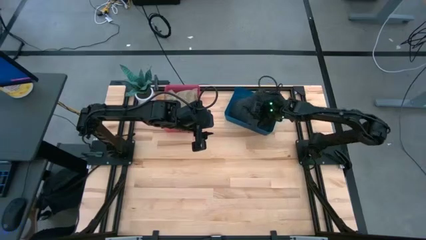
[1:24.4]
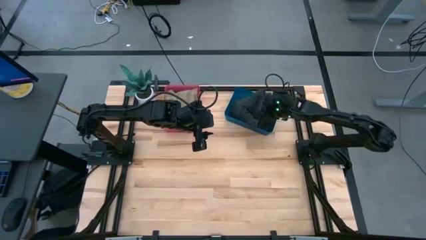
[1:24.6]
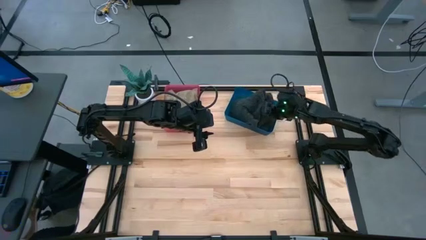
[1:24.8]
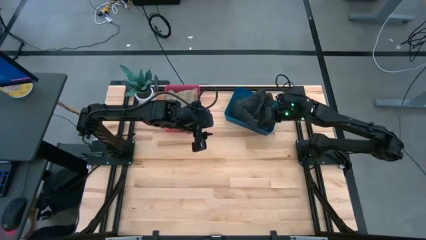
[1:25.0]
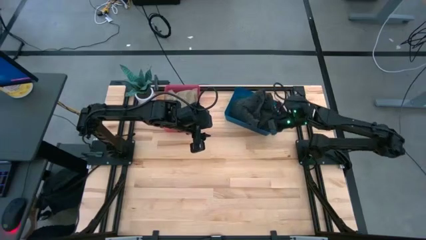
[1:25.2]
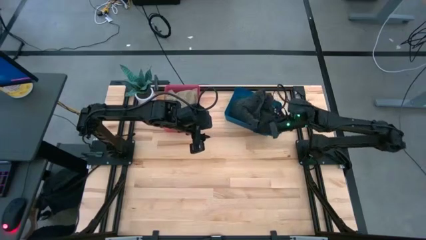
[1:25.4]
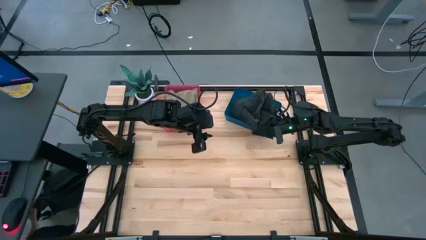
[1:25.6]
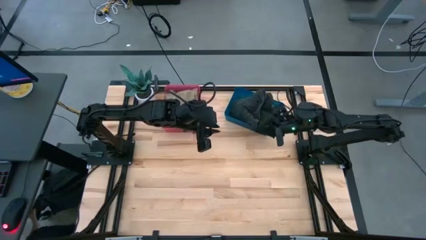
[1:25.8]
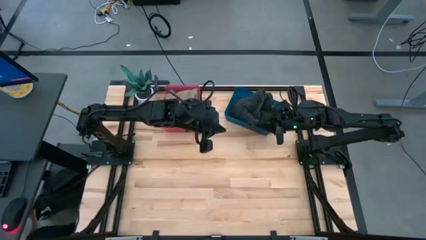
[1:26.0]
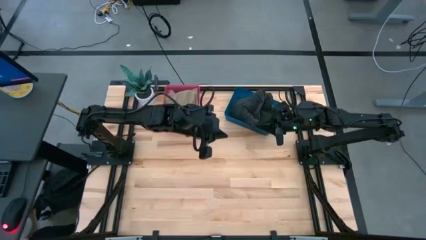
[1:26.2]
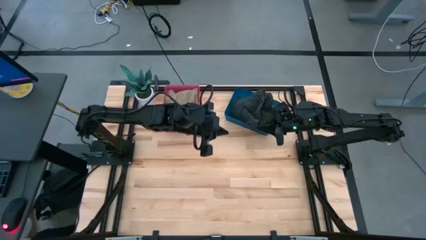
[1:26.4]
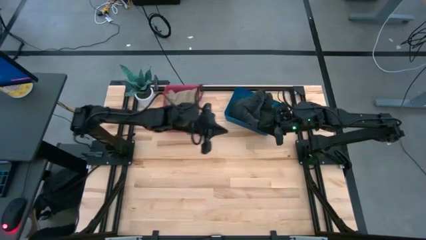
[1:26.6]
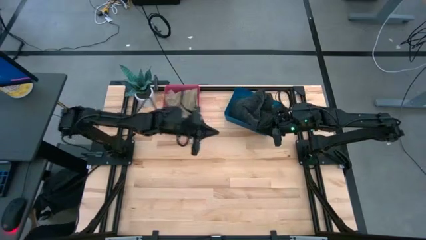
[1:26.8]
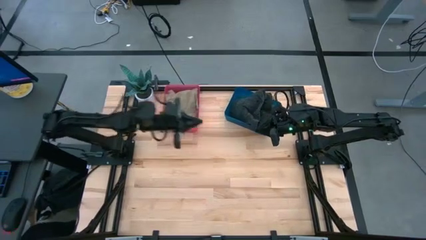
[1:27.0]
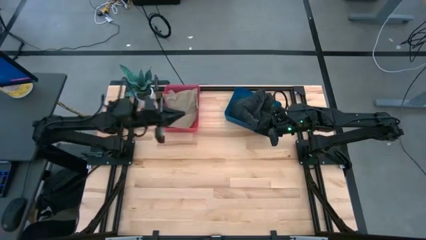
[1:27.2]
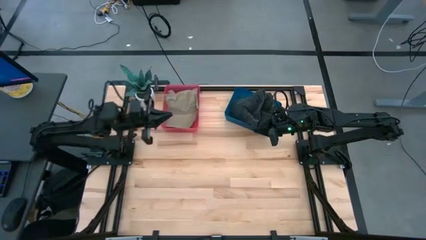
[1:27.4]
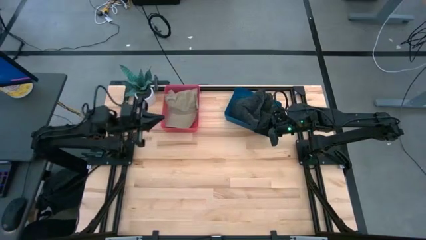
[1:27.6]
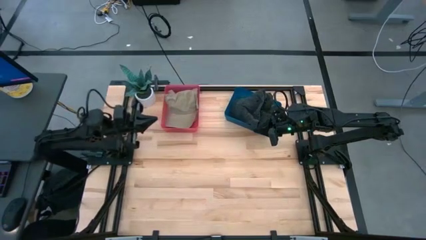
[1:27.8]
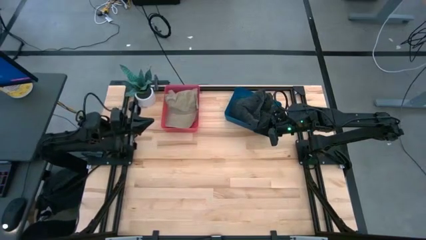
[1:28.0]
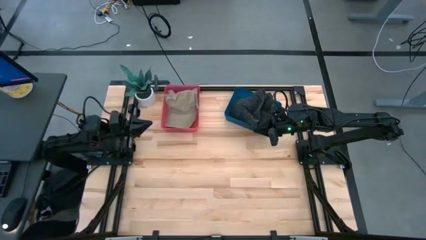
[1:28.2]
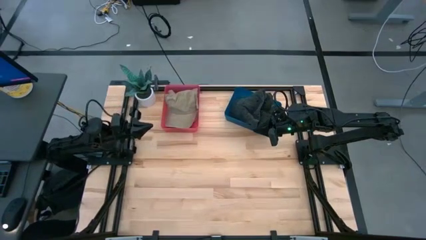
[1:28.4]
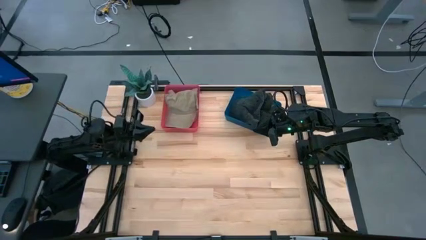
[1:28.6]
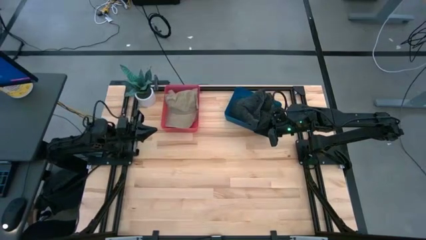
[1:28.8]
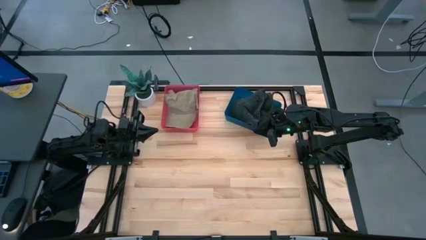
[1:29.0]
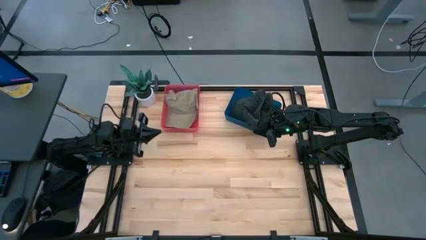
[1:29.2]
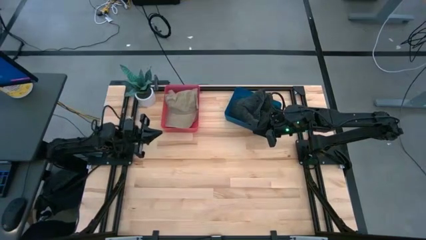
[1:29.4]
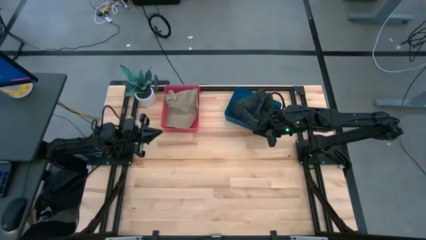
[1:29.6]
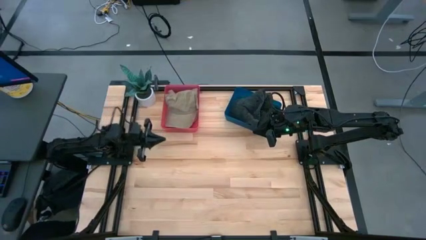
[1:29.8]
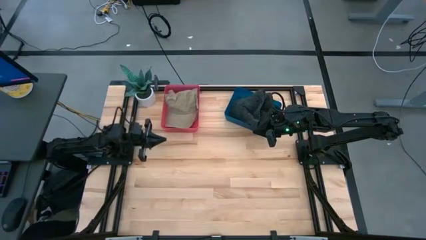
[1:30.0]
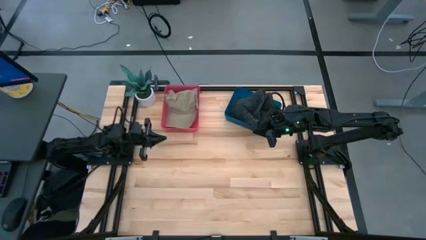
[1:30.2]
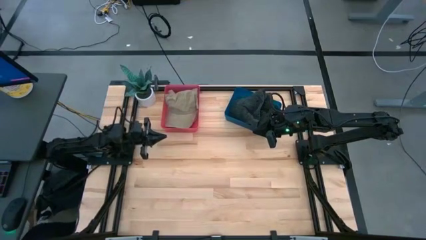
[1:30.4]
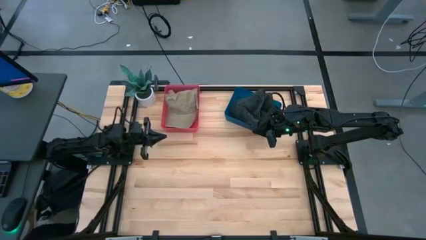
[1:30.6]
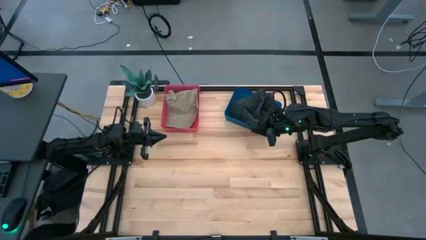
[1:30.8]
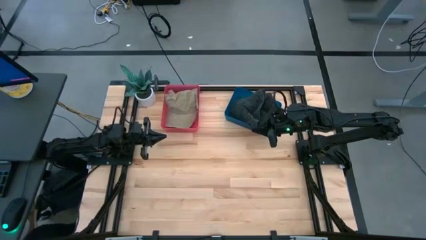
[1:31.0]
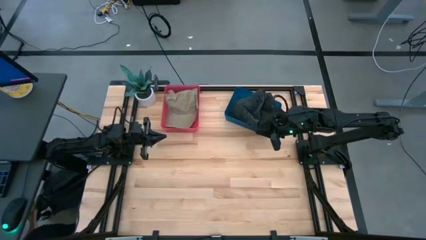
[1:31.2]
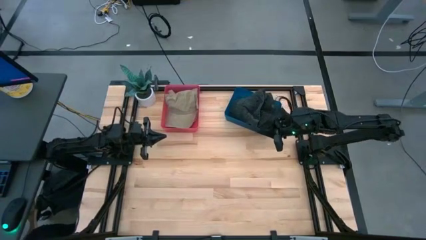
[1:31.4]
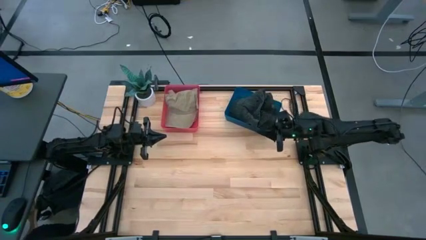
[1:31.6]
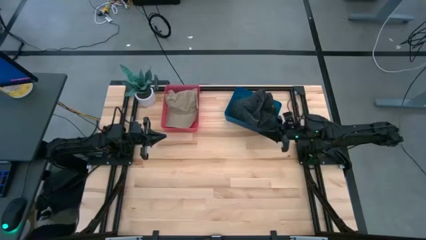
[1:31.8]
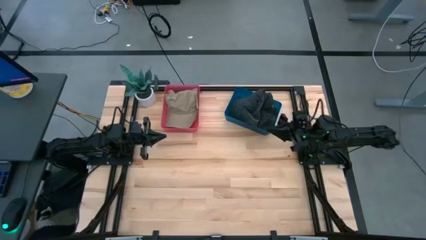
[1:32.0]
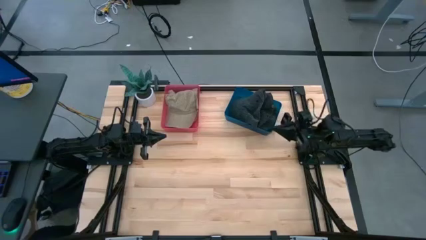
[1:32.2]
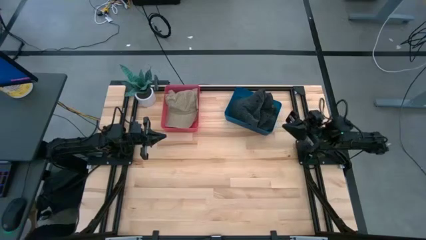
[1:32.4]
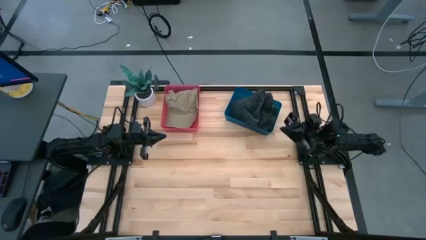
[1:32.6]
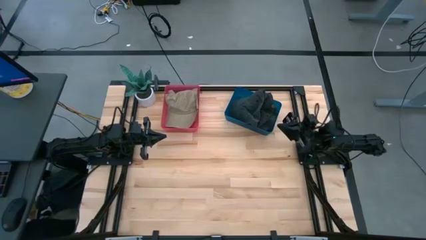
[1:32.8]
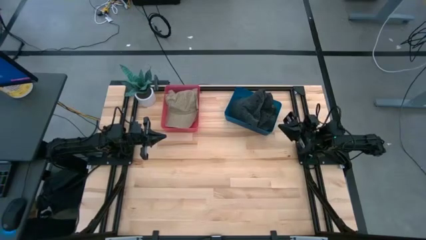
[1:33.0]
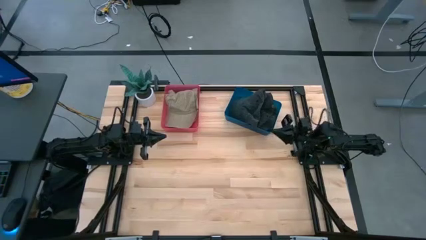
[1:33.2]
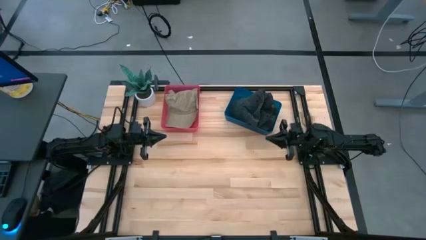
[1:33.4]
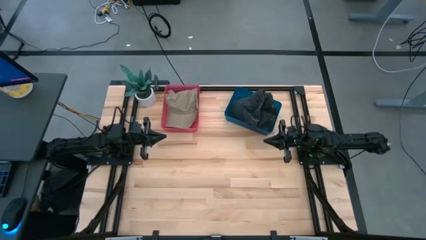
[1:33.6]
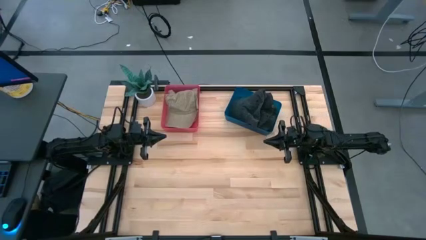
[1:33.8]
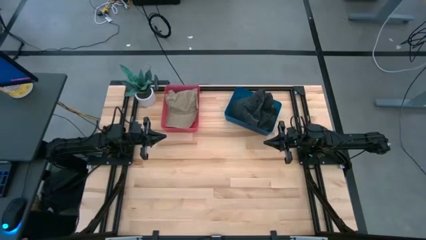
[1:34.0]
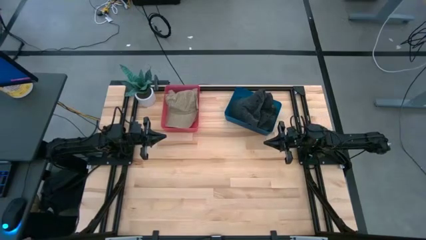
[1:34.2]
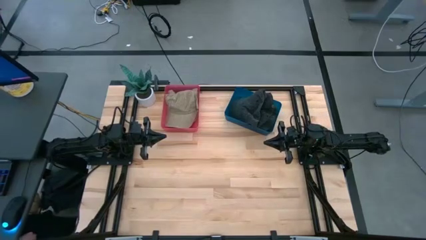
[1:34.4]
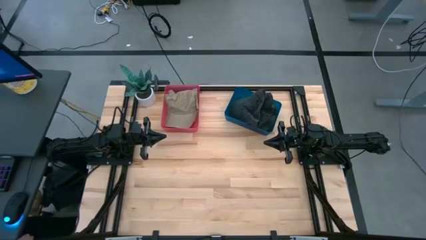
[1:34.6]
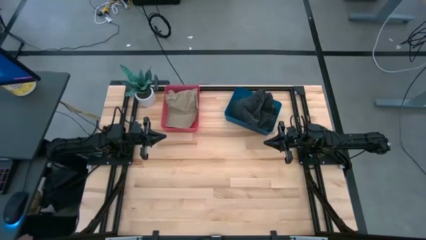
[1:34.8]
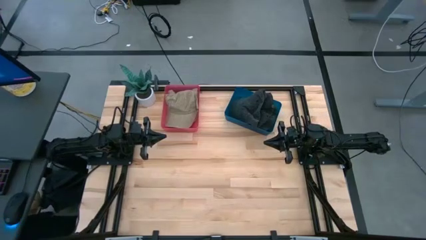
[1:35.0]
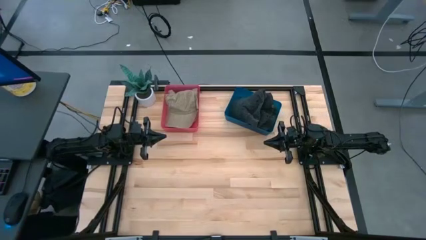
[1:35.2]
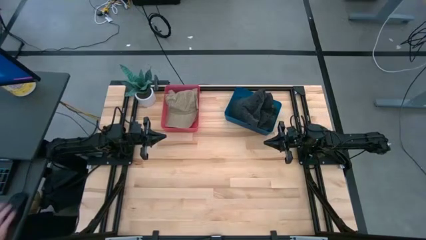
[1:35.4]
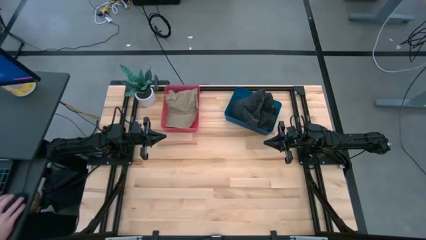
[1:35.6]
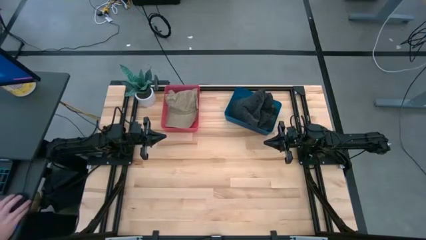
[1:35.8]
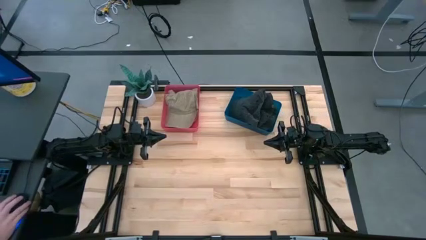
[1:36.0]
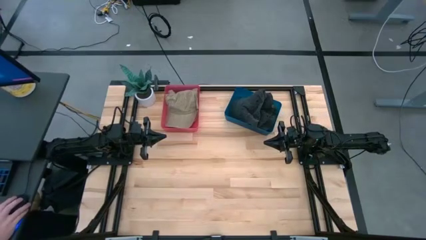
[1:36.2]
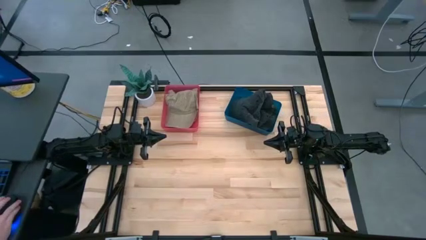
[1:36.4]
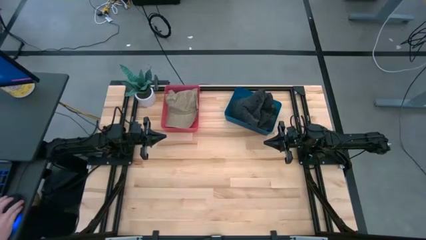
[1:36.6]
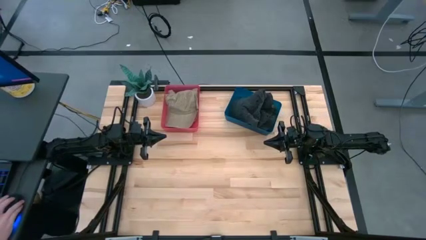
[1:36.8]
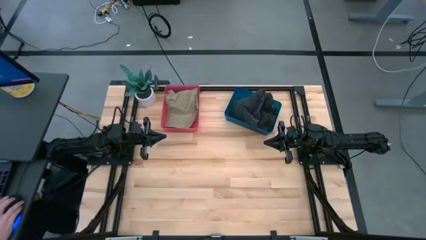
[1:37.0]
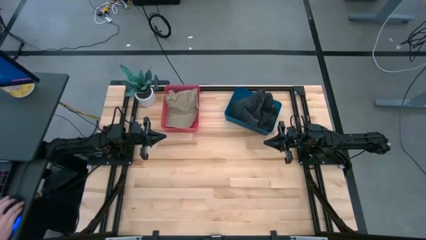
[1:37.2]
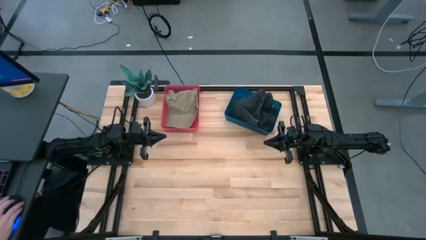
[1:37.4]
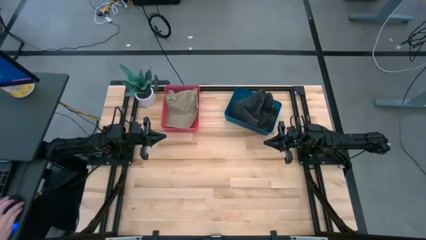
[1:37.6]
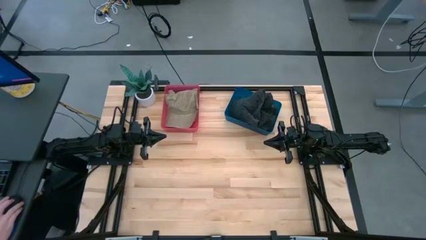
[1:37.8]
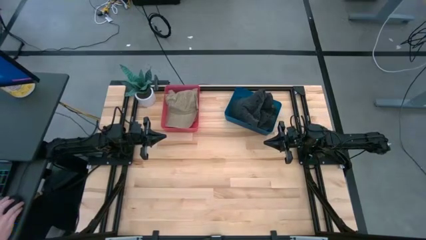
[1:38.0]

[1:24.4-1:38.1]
Task: Pick & Place hat
Return to Home Position

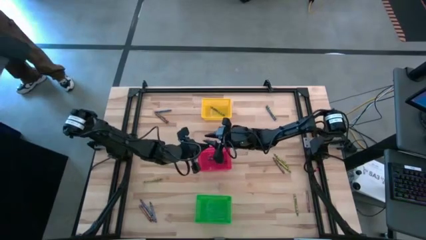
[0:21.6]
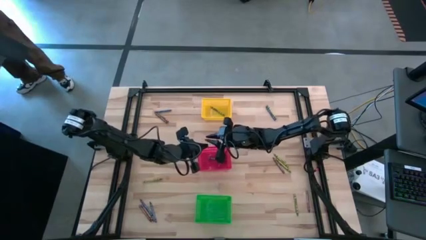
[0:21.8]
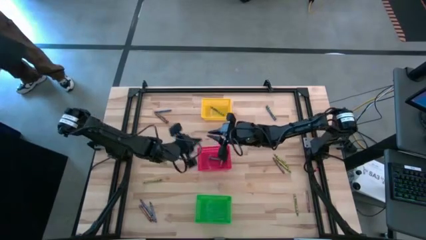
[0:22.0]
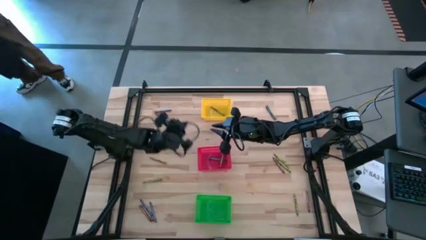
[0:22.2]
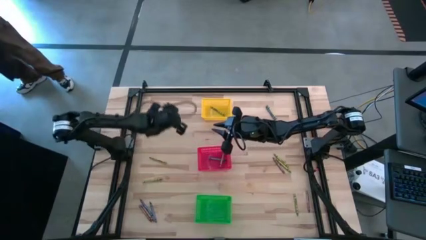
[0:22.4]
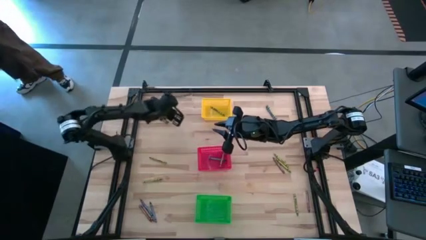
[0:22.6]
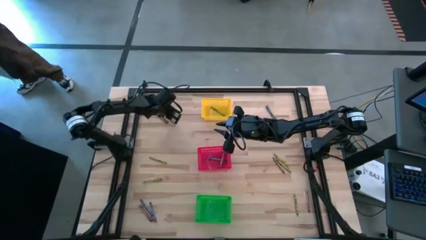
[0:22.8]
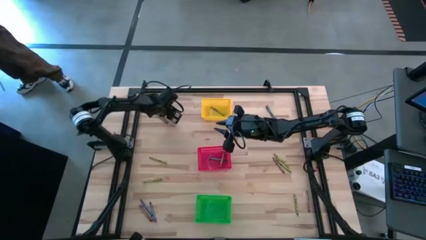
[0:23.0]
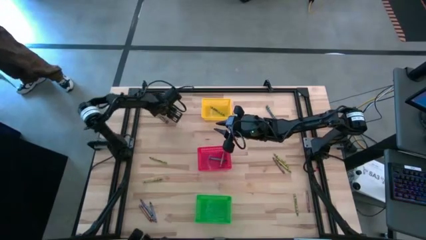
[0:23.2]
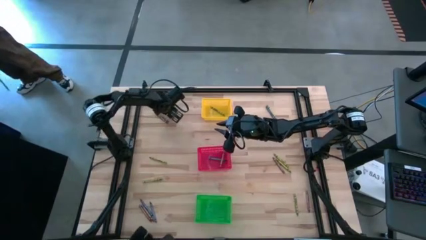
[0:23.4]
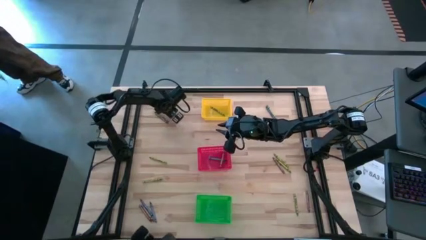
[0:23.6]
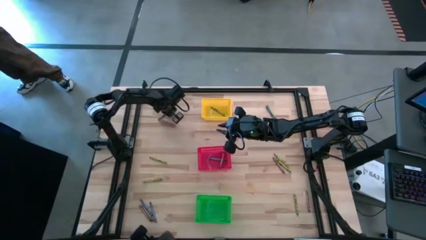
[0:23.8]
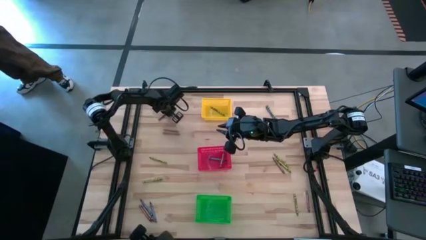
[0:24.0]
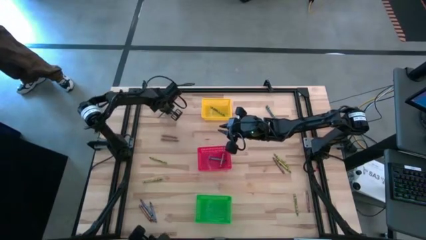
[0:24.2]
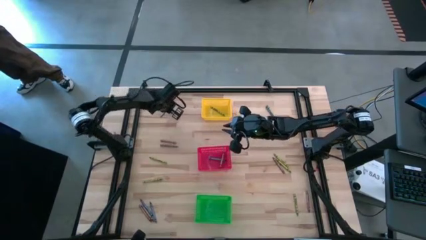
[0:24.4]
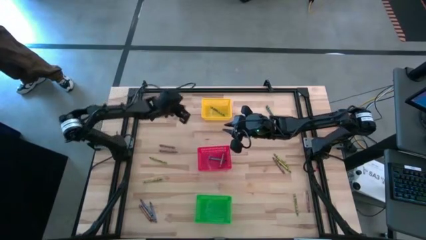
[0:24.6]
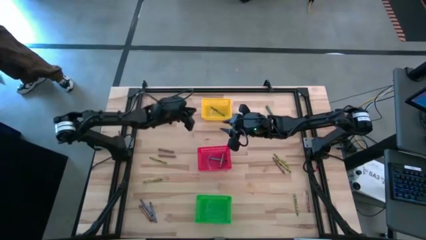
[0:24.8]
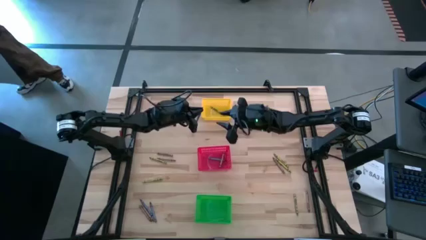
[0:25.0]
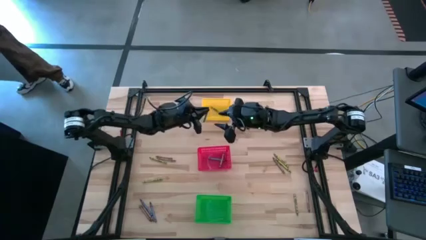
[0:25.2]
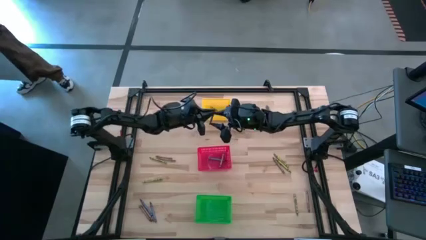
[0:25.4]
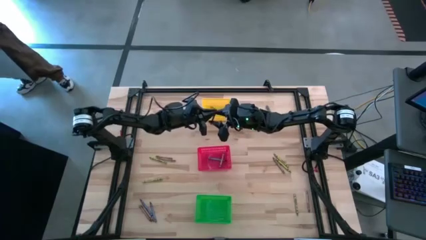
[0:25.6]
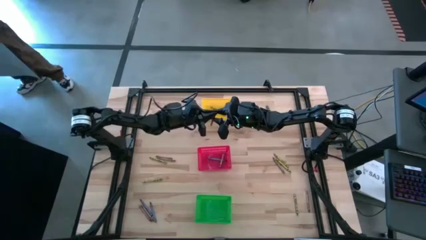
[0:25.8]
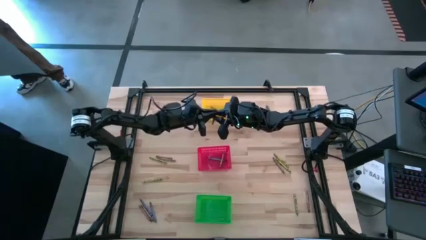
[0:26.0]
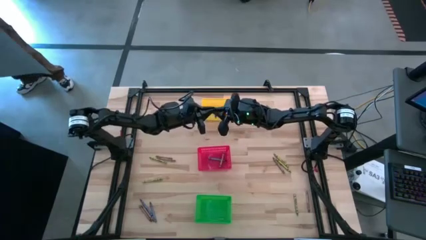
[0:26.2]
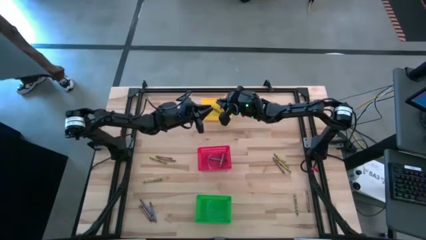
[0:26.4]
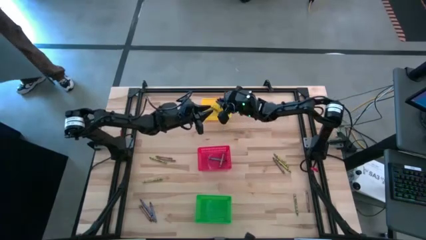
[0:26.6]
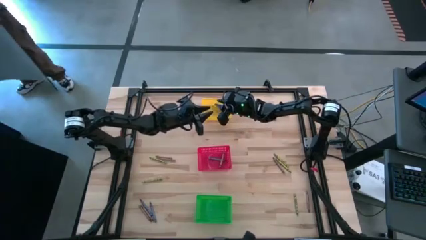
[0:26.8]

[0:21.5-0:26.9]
Task: Sort crayons
Put the blue crayon into the yellow bin
